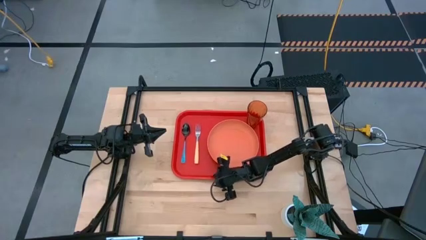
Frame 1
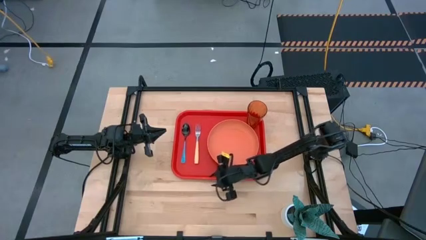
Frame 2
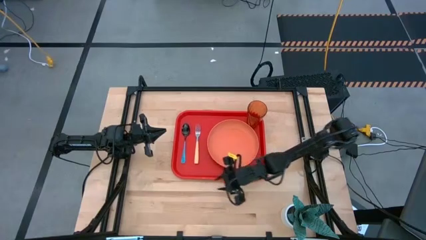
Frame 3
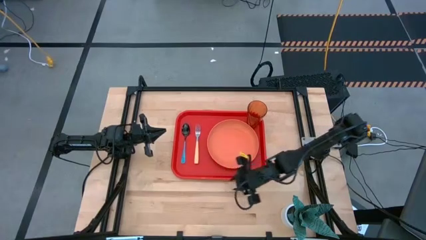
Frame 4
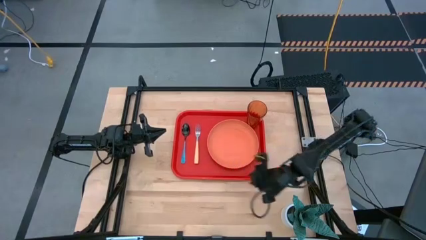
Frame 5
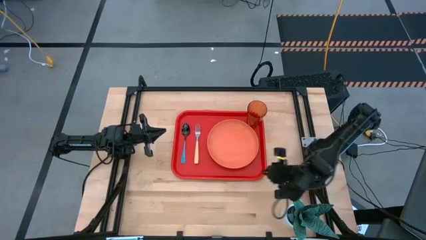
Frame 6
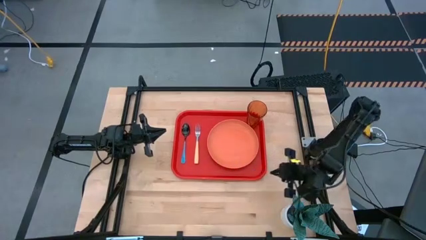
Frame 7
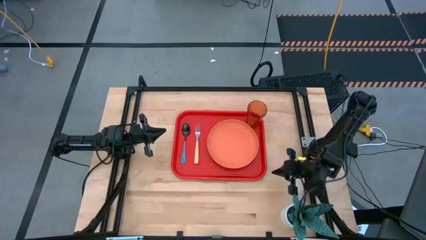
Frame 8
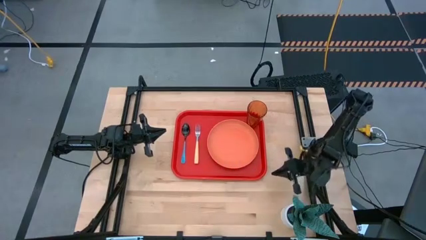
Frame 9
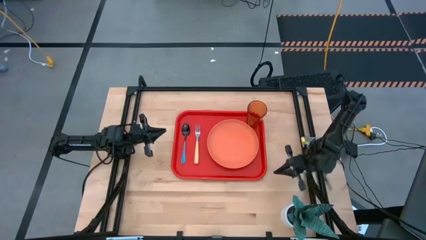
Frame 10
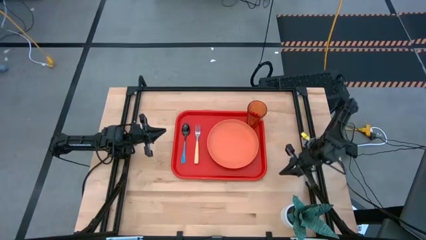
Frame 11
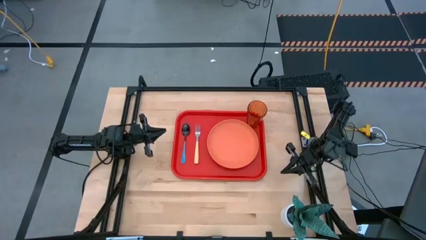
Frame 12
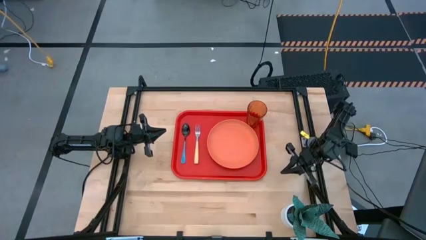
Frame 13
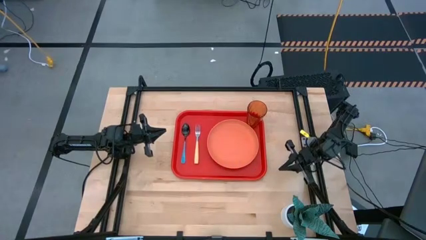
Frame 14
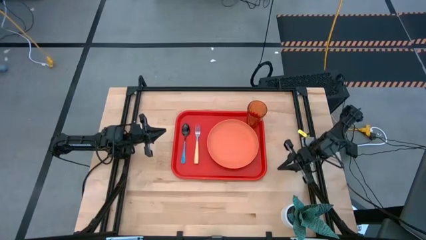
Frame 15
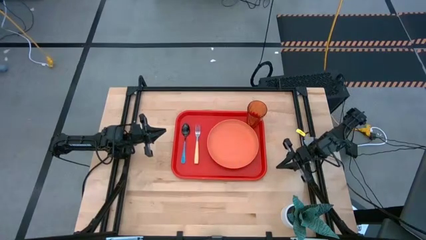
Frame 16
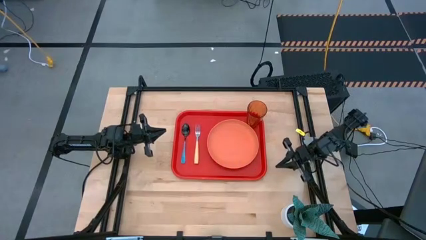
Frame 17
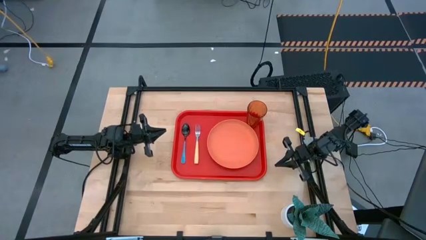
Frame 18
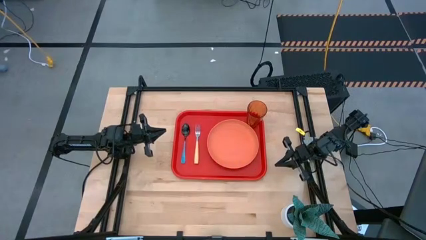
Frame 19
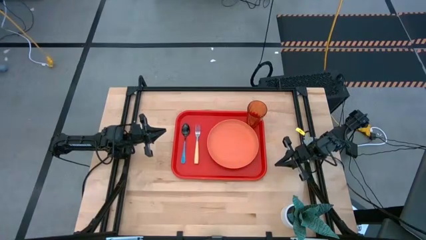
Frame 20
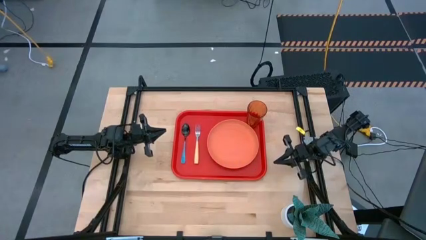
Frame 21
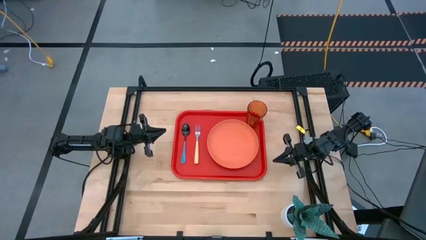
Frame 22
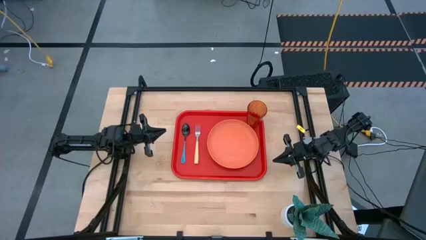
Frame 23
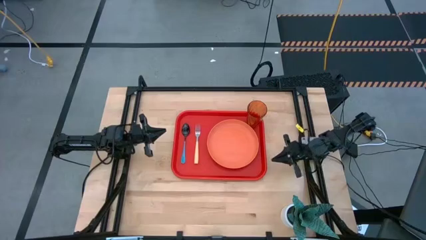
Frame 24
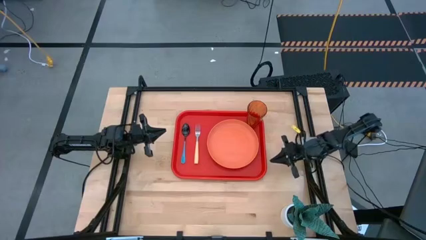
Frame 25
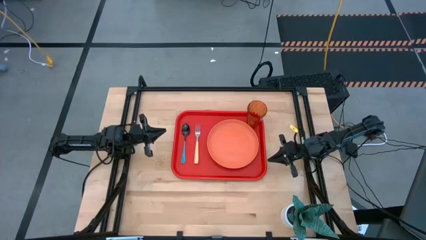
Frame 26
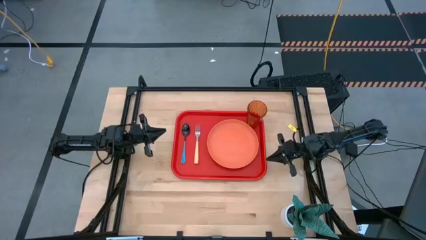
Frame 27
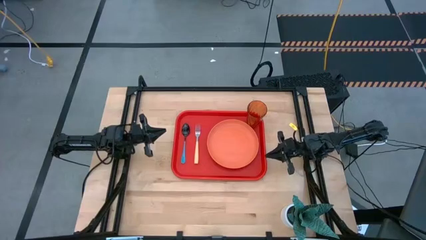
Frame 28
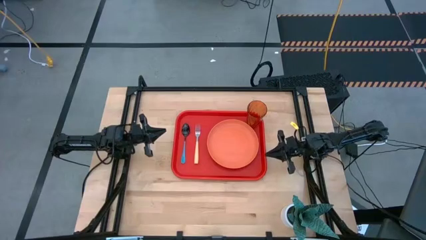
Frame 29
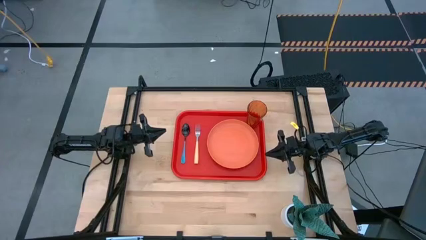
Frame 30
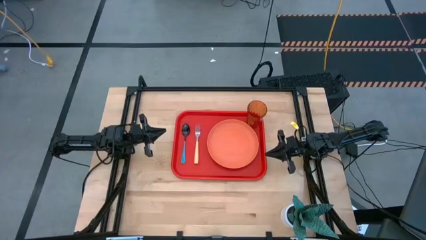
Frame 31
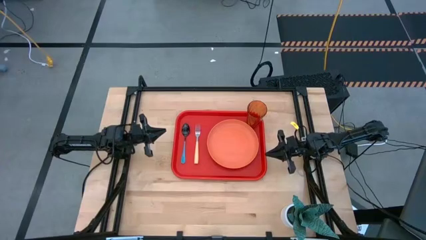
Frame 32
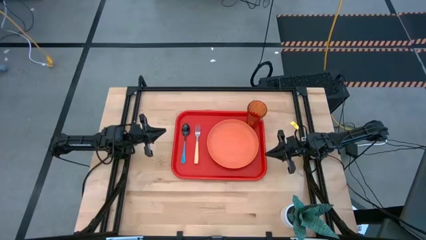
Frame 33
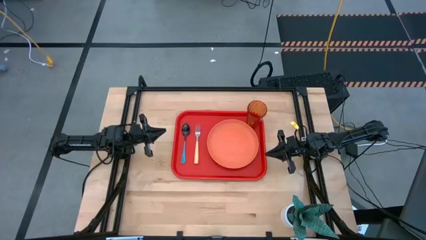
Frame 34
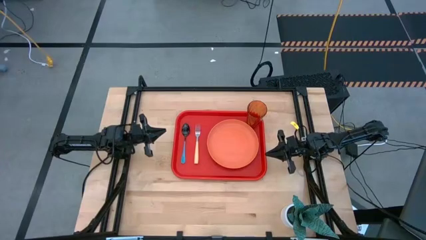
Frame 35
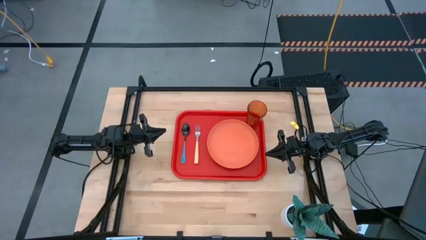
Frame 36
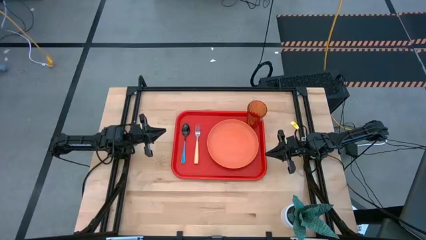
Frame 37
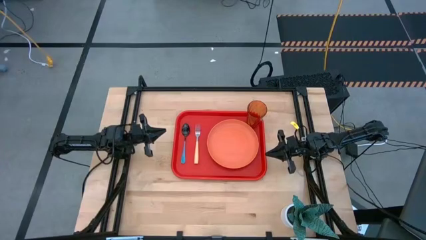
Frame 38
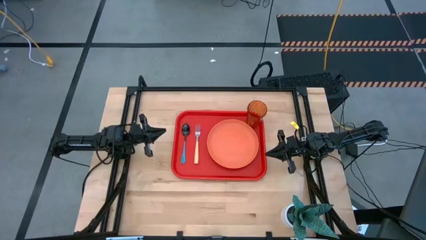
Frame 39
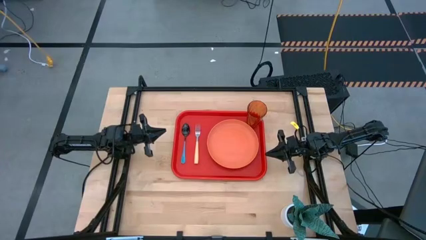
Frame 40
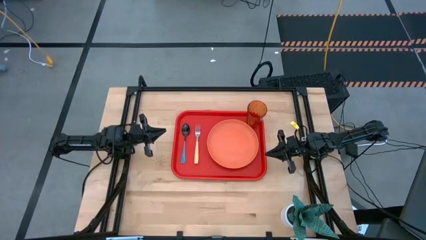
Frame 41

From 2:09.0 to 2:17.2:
Task: Pick and place plate/cup/fork/spoon on tray
Return to Home Position

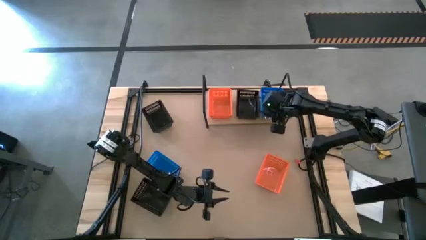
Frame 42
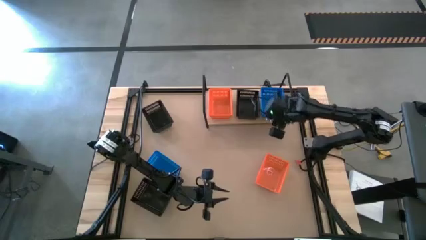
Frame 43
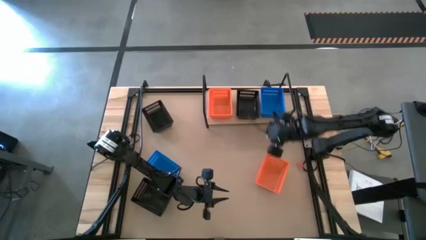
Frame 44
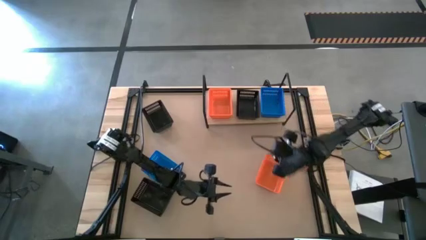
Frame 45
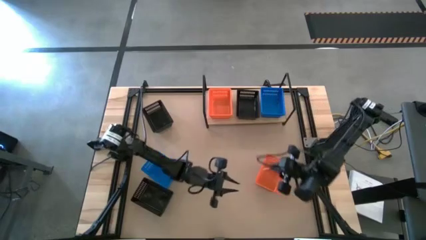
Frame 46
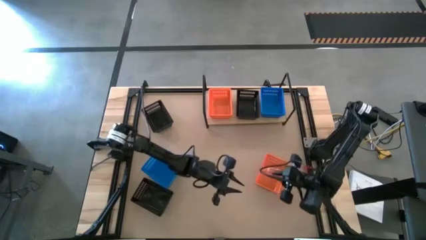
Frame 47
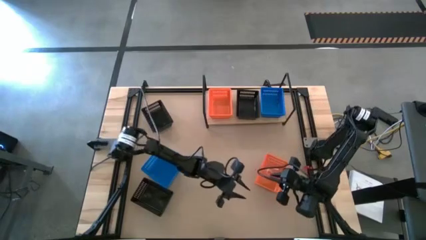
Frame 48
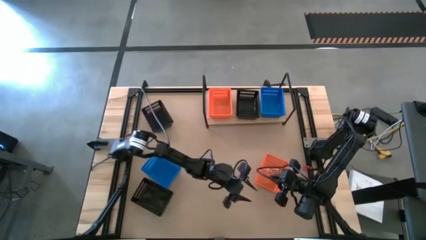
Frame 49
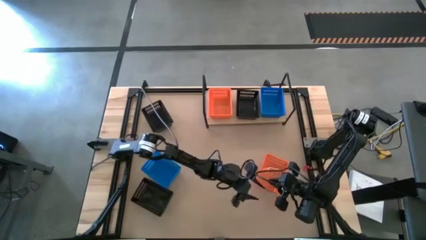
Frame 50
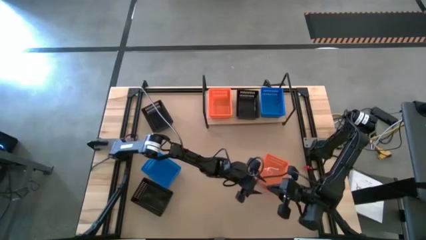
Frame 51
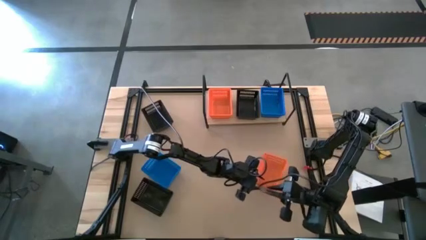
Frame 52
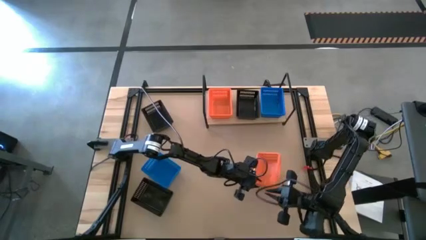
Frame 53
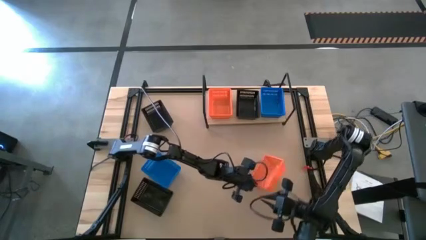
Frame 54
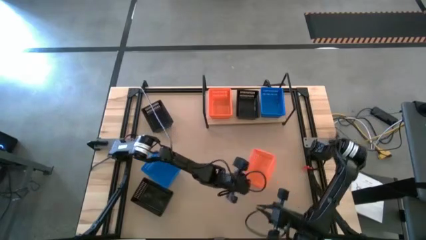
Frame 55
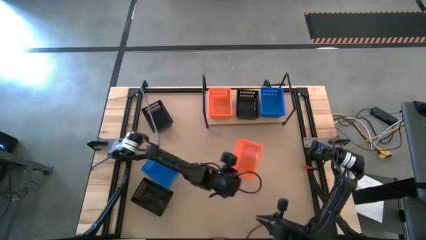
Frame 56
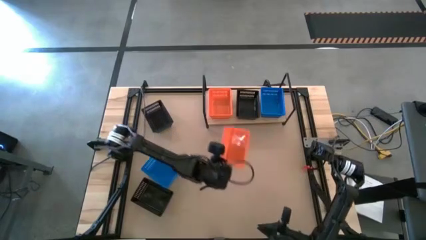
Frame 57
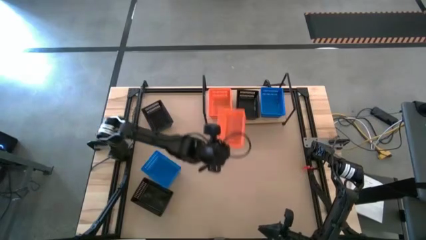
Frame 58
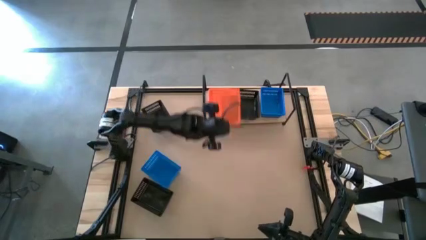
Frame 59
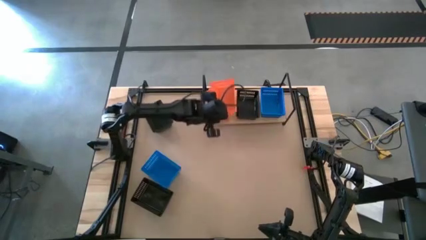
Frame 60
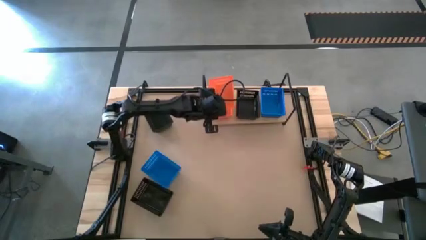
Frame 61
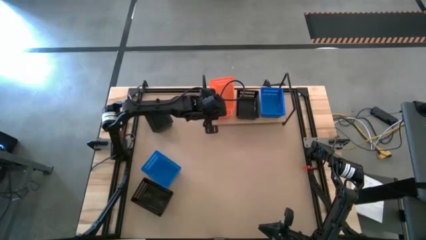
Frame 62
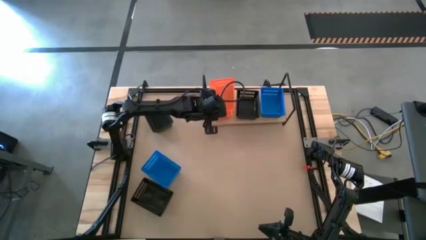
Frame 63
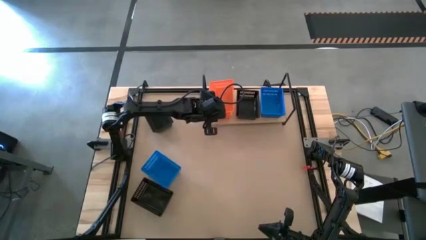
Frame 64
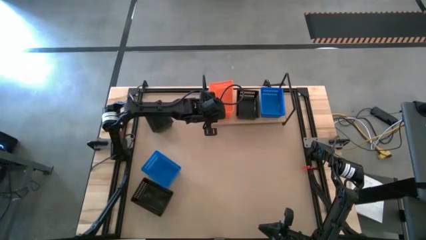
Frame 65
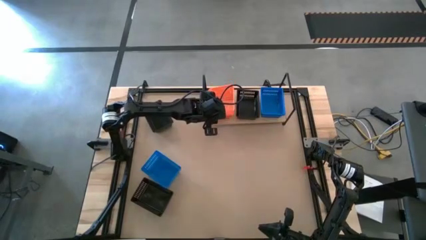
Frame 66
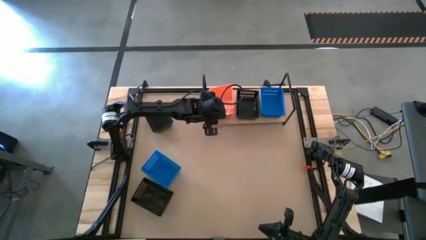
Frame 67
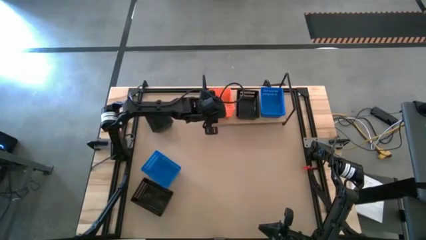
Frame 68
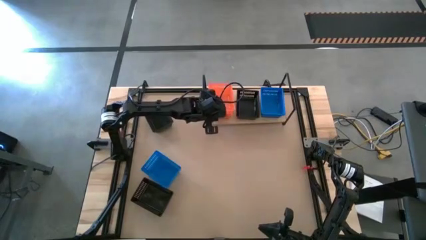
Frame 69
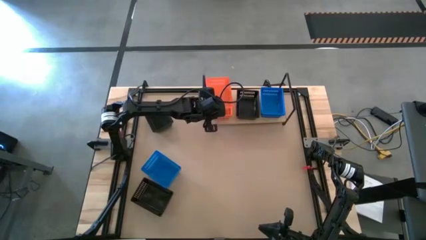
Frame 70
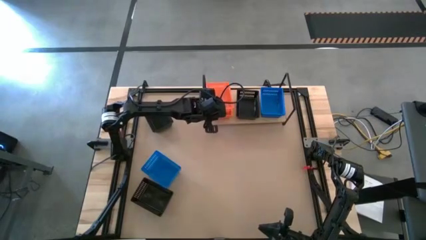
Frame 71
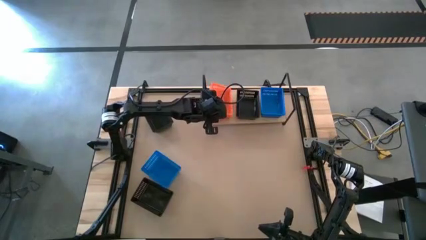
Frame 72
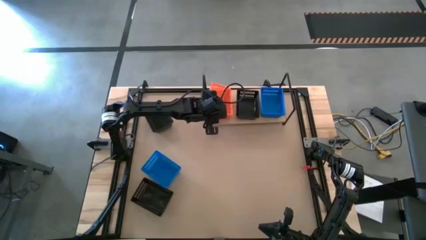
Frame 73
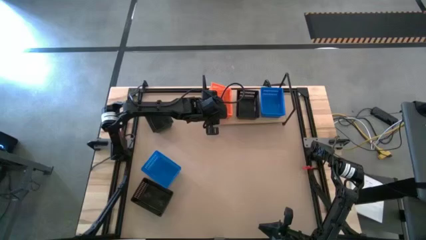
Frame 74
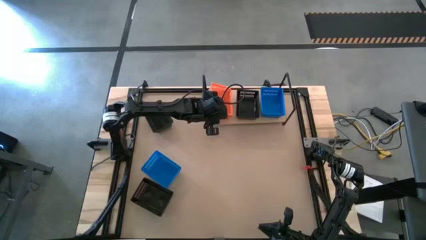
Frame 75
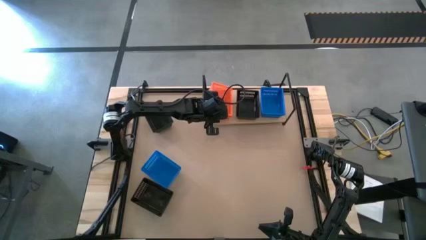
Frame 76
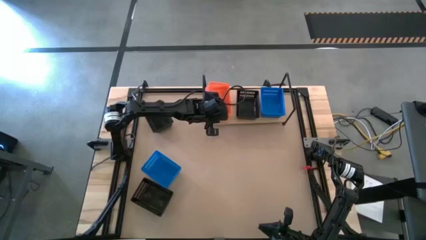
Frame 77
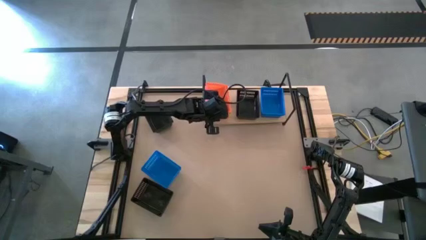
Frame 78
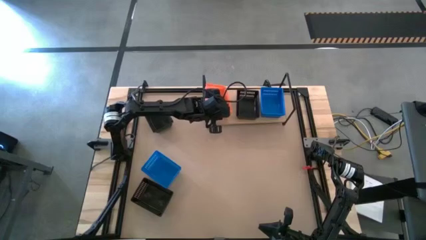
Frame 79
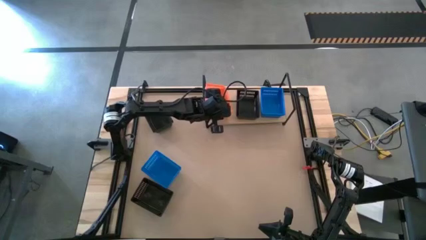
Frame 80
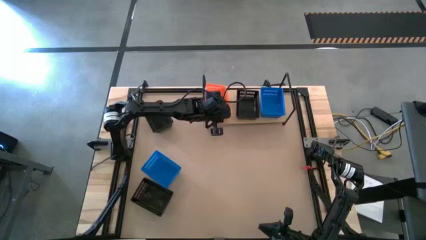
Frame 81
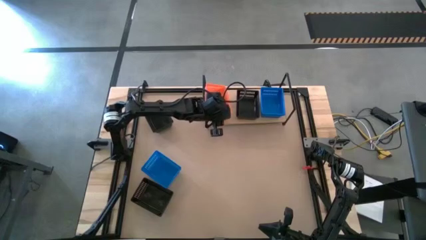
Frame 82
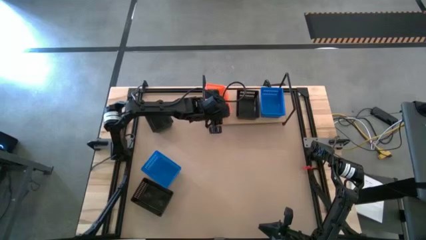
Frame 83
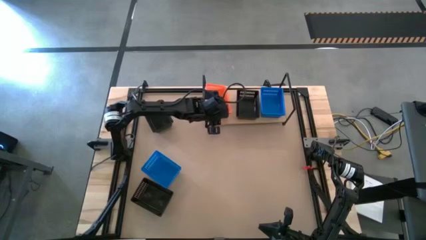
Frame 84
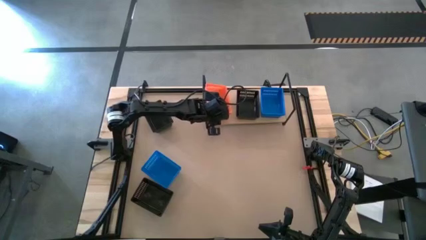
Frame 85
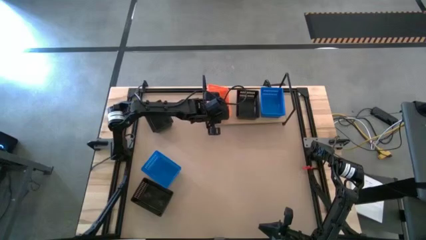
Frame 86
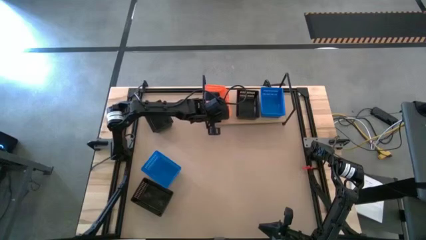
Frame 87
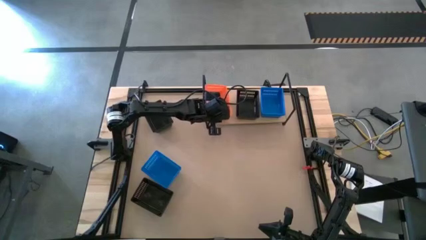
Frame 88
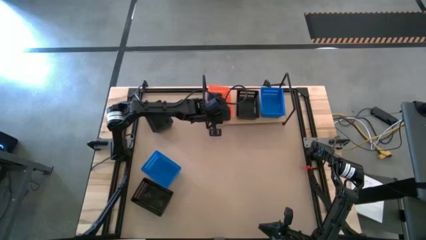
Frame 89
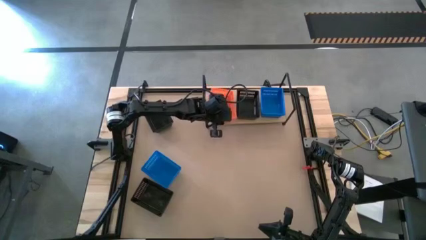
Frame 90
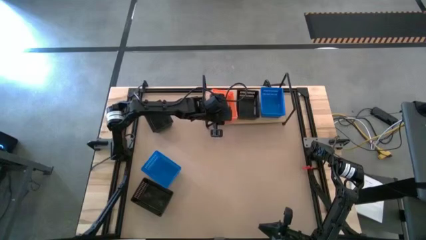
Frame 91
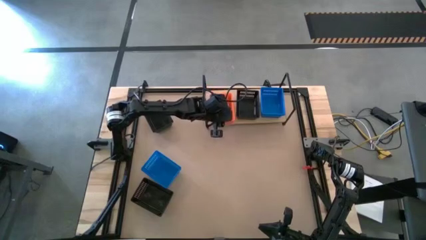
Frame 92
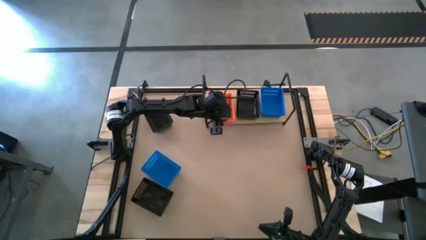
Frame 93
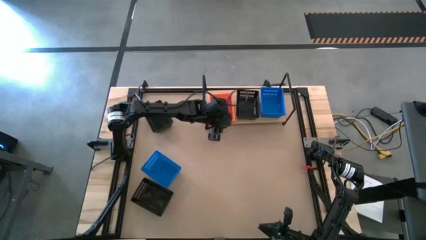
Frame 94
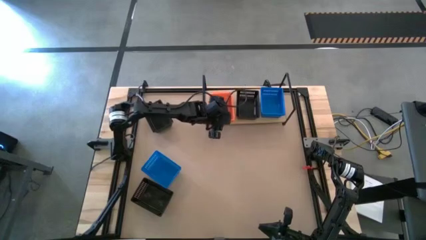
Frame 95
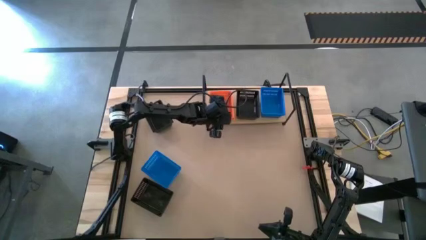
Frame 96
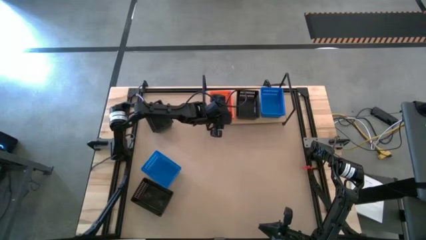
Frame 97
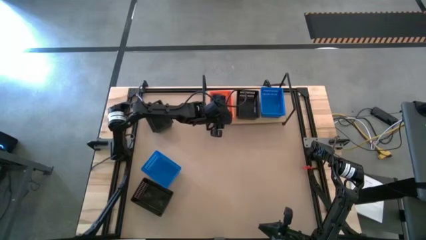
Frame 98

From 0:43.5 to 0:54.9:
Task: Stack baskets on shelf by color
Stack the orange basket in the other orange baskets on the shelf
